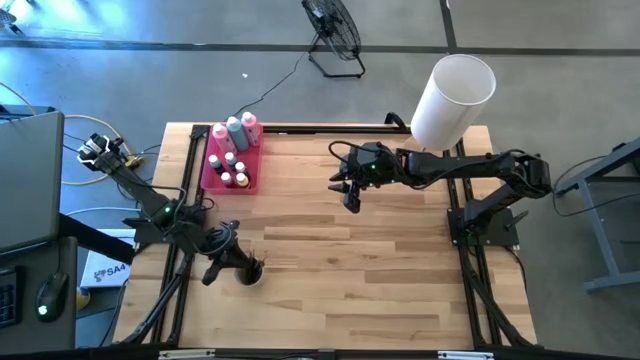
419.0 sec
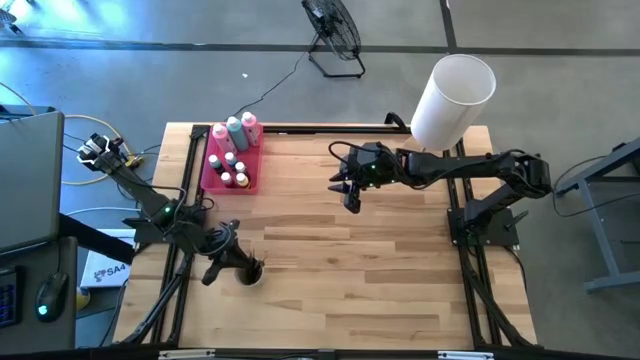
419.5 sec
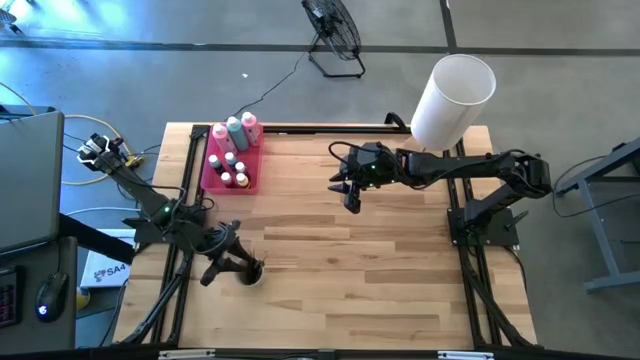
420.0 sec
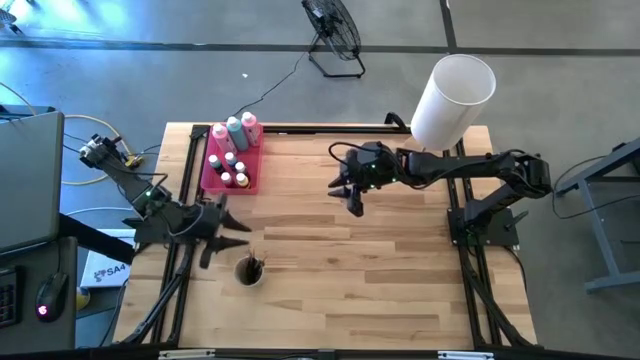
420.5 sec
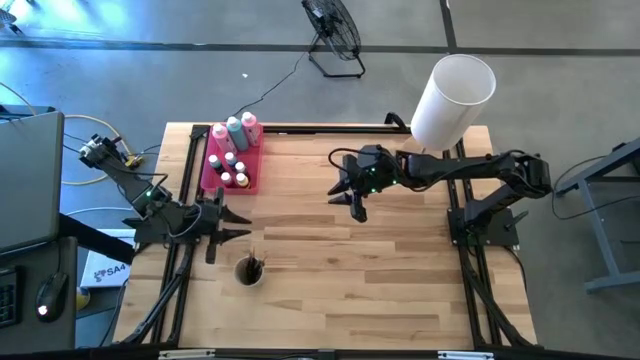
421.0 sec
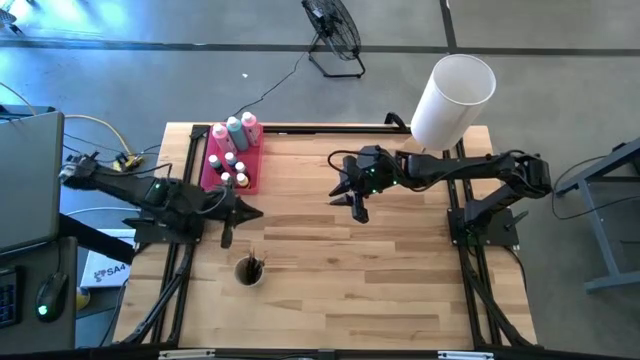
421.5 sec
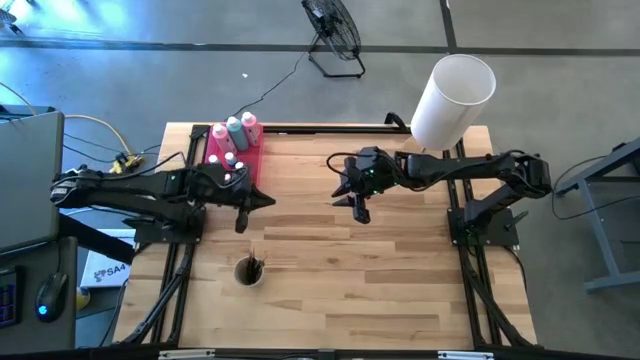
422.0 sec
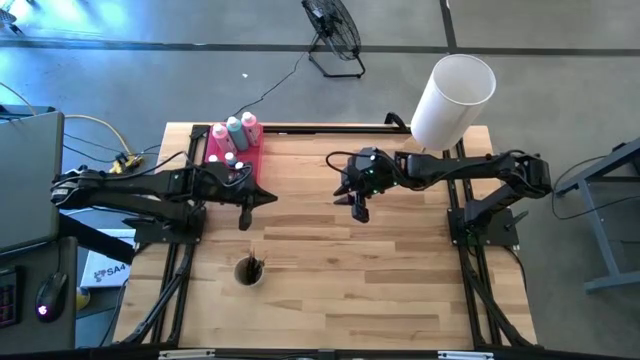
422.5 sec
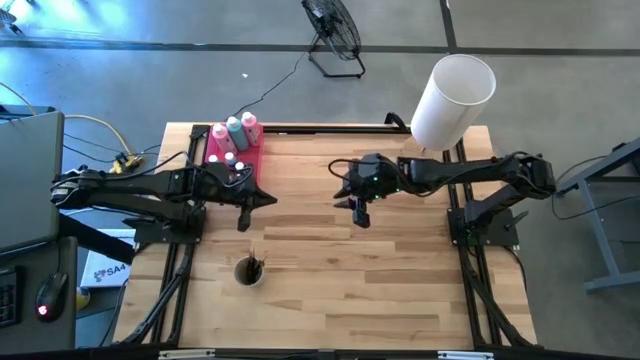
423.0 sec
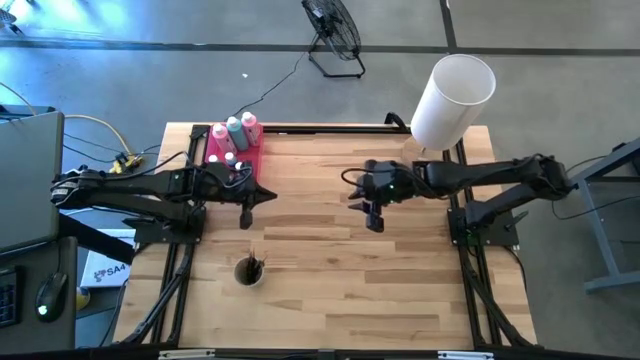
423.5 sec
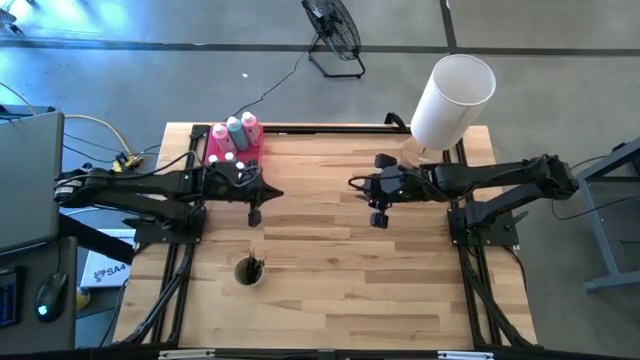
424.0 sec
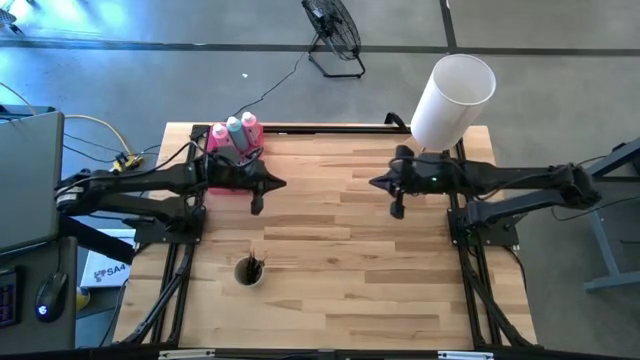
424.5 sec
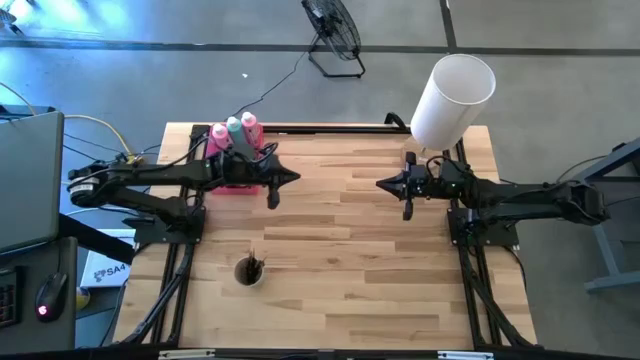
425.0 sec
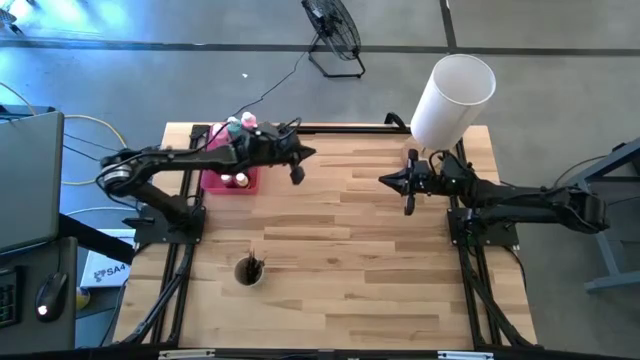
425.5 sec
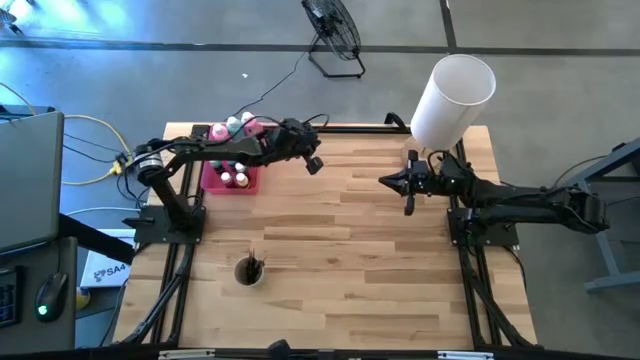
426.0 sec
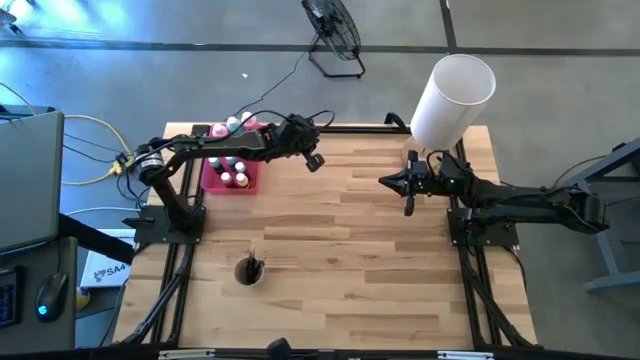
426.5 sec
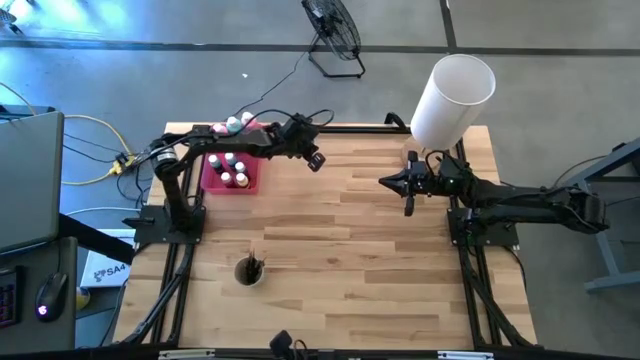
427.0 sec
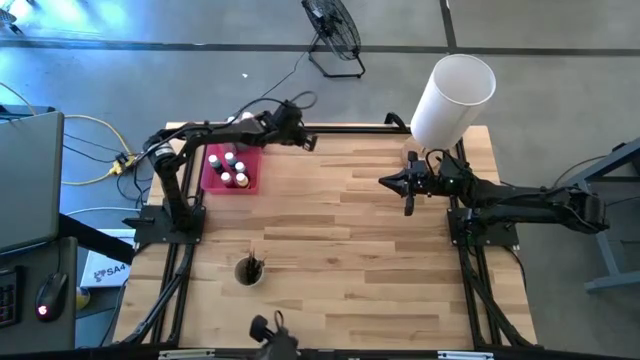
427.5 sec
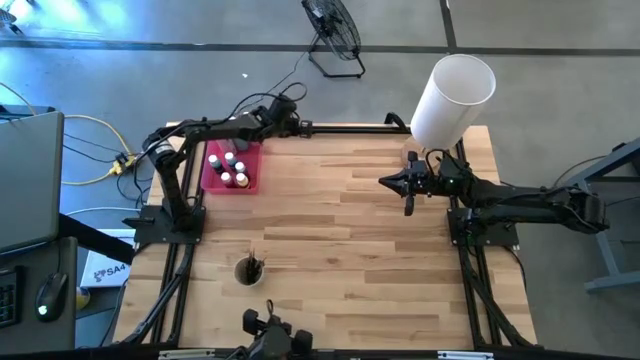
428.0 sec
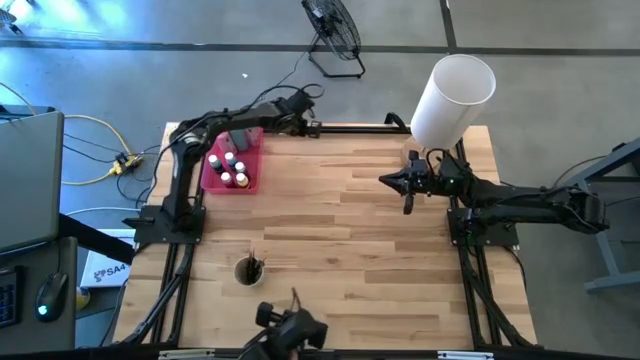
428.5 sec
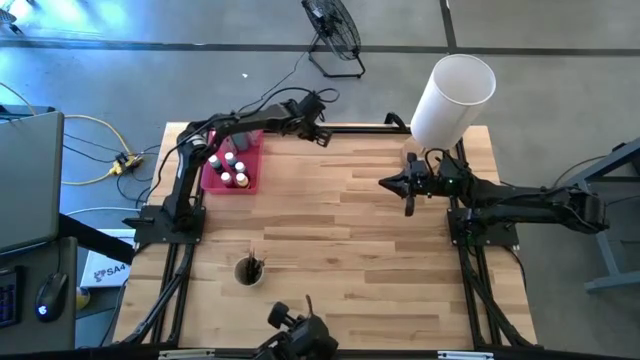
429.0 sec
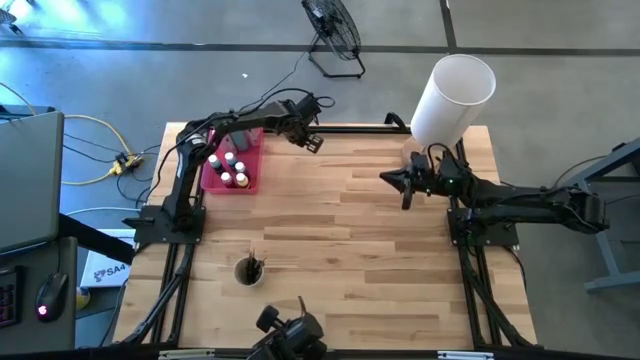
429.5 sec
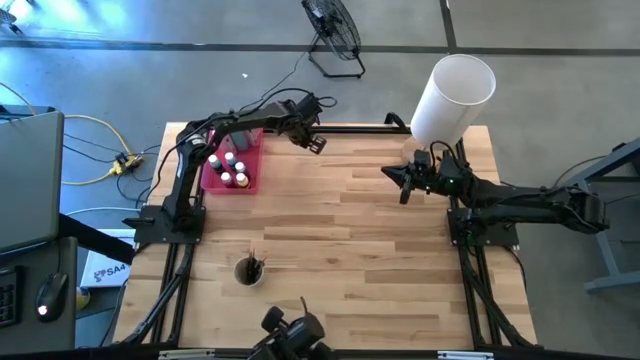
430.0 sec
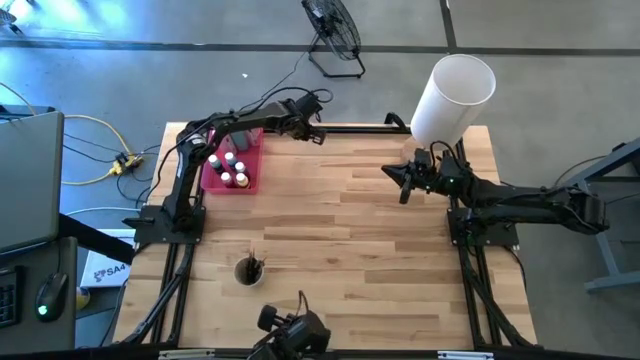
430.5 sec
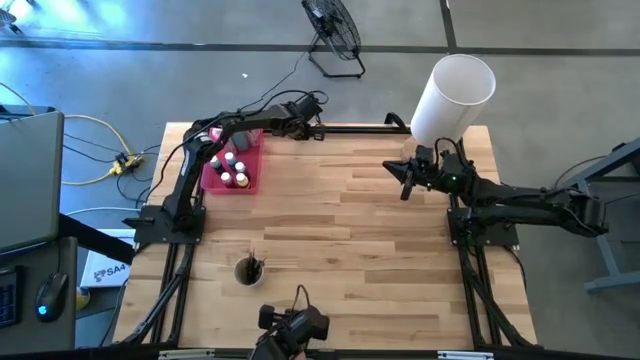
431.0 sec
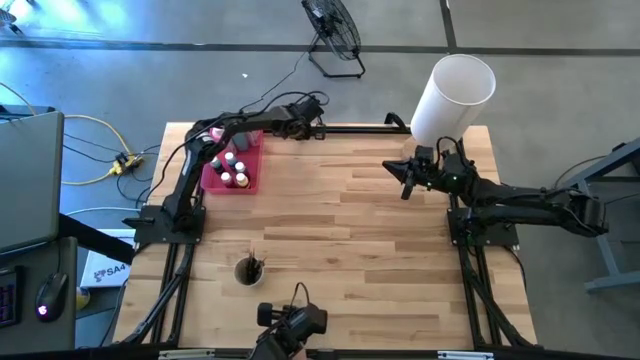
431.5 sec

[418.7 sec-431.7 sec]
Task: Pick & Place Paint Supplies
Put the silver paintbrush into the light brown cup
